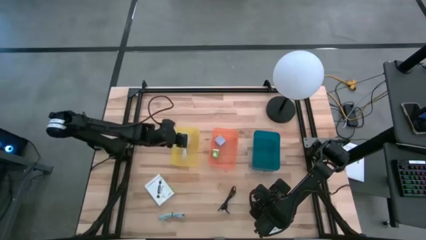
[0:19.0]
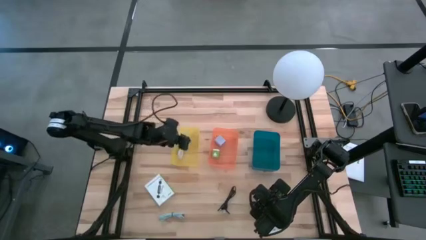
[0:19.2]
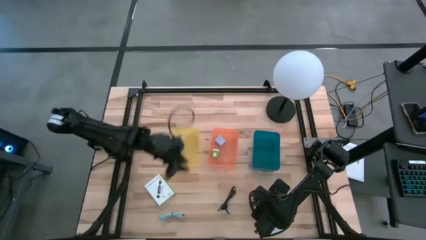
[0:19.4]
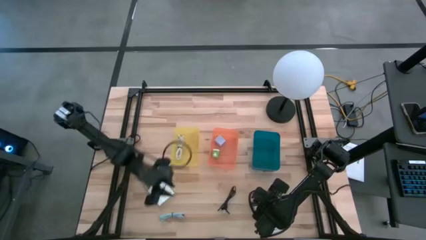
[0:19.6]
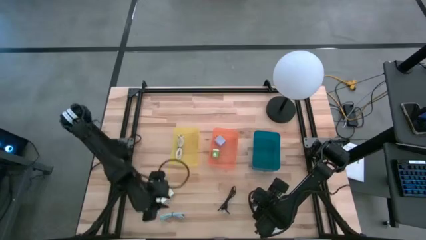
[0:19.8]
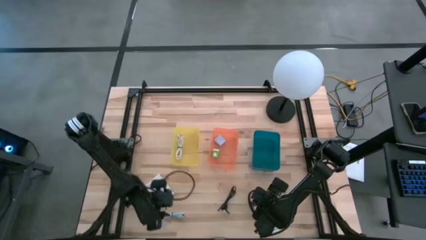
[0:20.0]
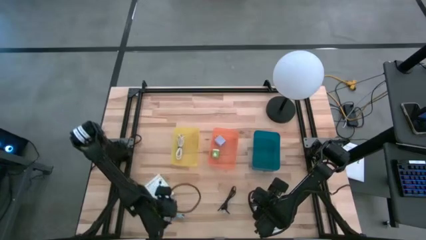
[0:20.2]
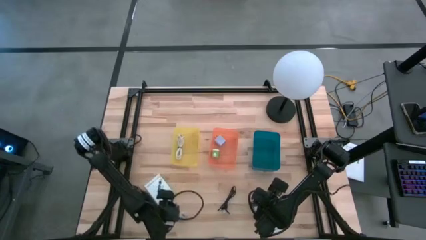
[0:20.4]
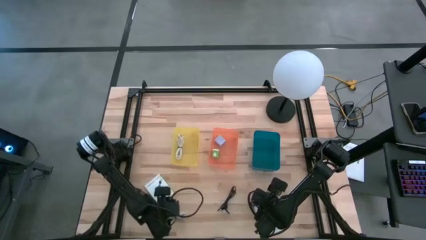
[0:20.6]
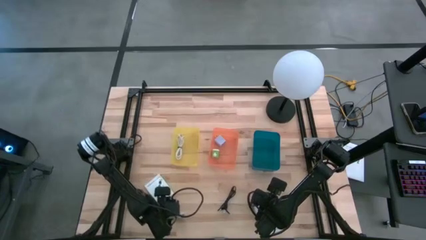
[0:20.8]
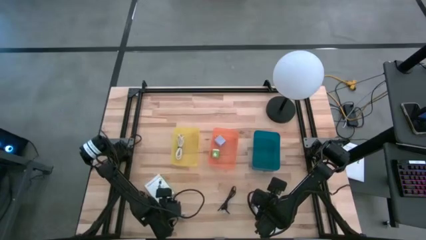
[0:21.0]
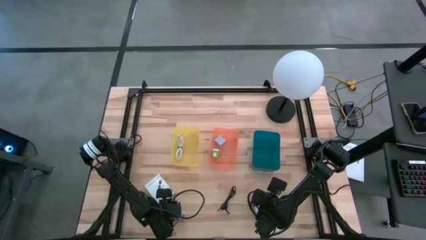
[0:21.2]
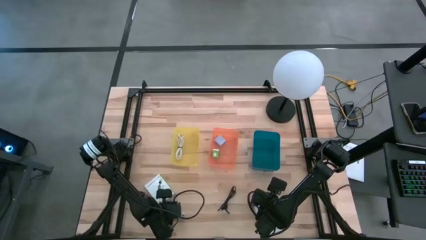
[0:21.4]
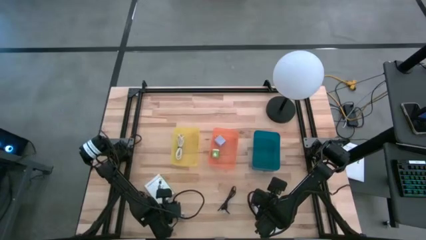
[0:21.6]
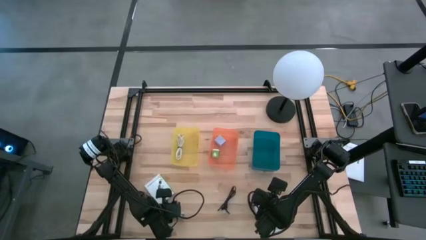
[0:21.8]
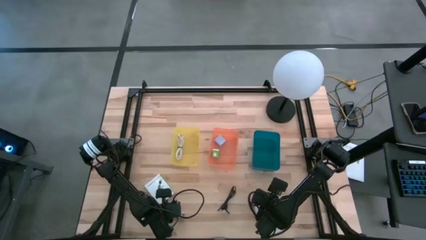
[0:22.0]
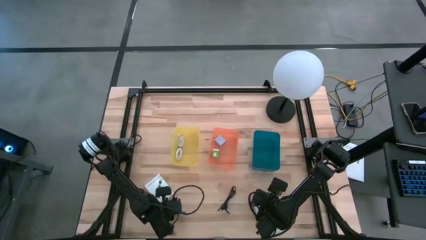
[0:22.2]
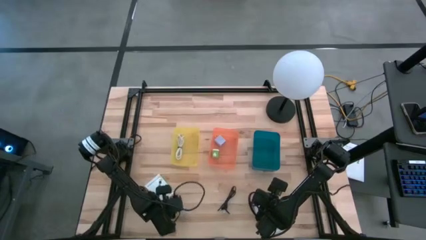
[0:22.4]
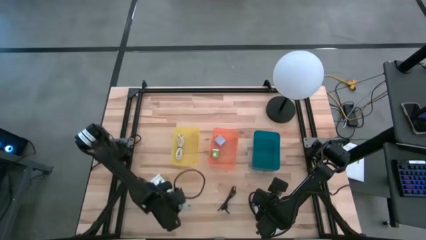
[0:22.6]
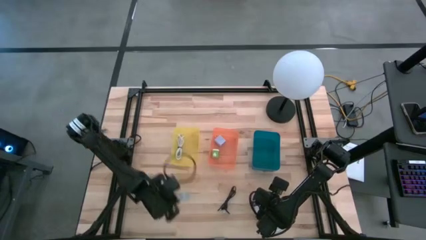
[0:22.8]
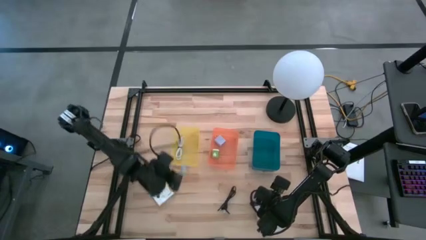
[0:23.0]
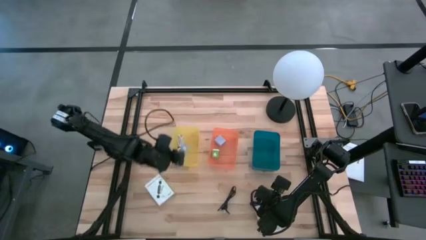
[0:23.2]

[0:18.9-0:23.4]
Task: Pick and place items into bin
Put the light blue charger cable into the yellow bin

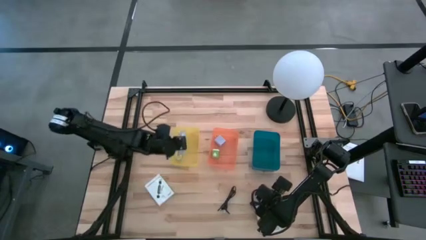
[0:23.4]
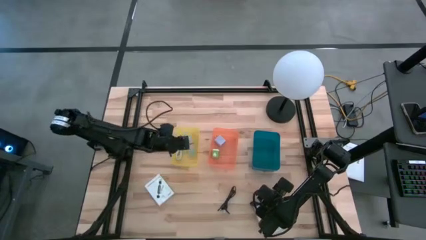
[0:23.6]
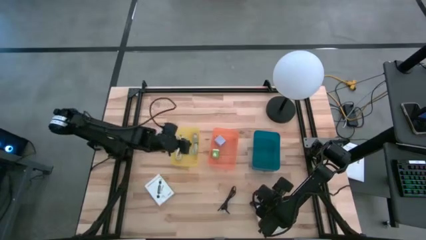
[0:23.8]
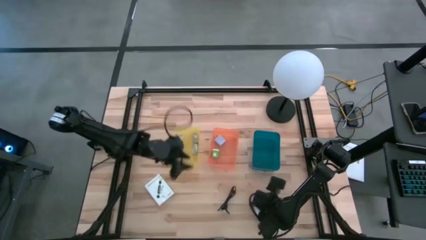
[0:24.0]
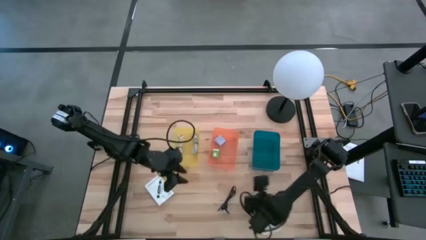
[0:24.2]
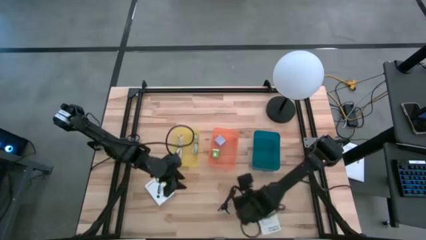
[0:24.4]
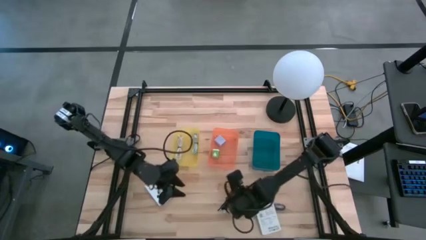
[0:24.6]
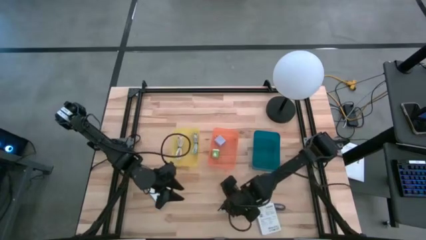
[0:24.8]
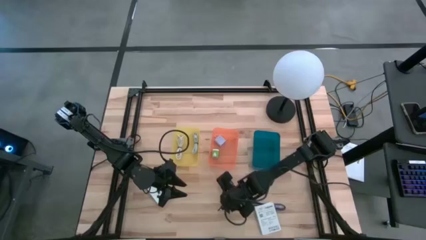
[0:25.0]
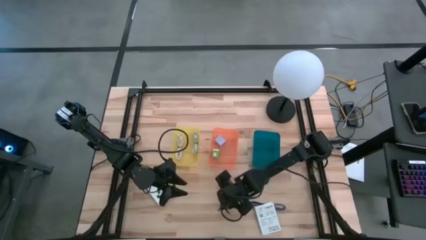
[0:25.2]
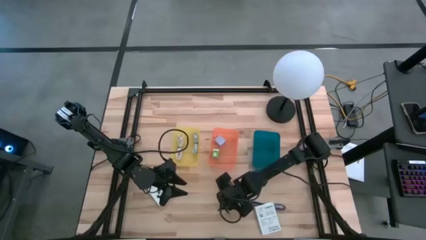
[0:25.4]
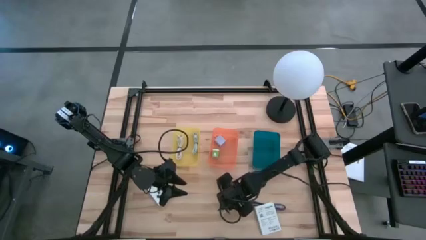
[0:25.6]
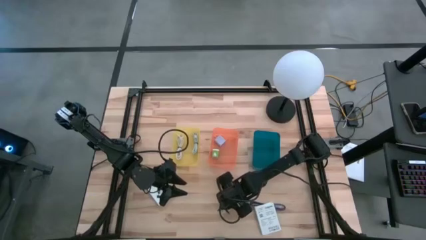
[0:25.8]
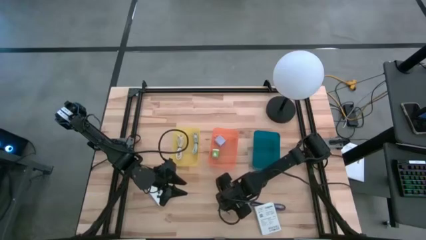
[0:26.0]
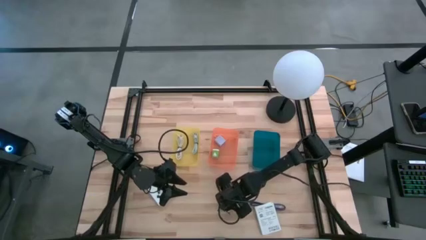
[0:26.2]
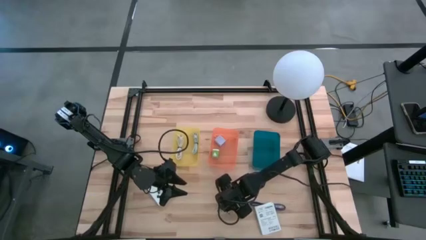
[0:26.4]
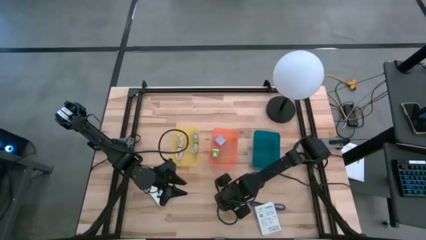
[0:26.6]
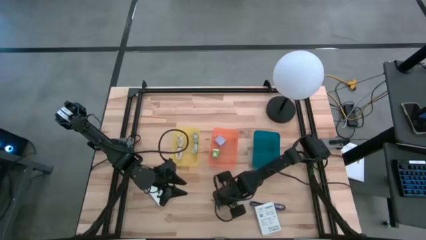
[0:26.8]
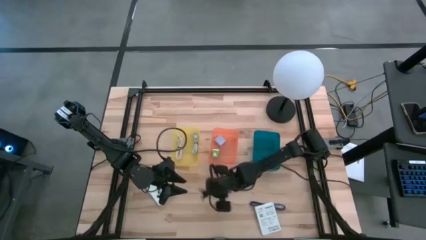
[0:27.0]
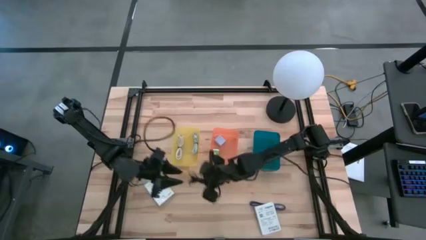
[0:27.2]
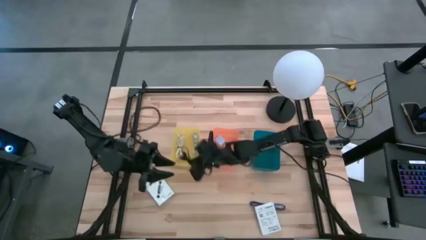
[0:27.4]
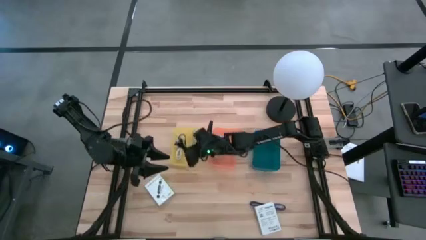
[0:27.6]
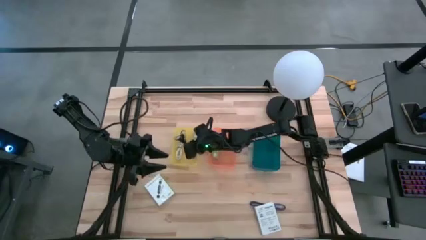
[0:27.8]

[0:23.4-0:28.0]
Put the black charger cable into the yellow bin

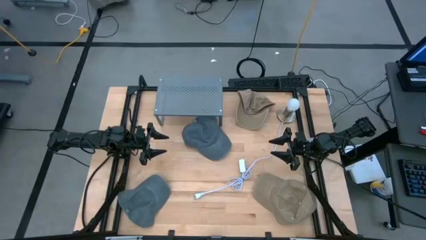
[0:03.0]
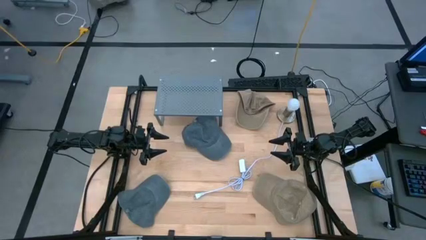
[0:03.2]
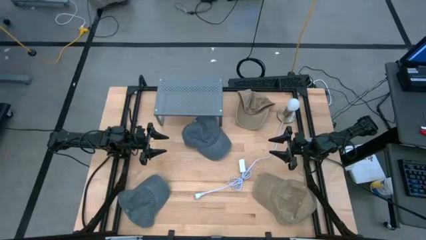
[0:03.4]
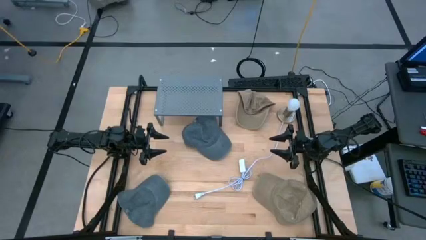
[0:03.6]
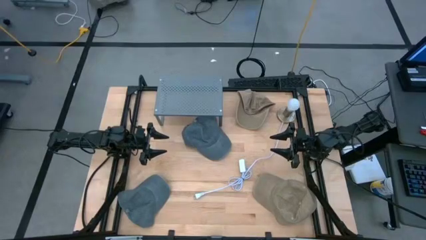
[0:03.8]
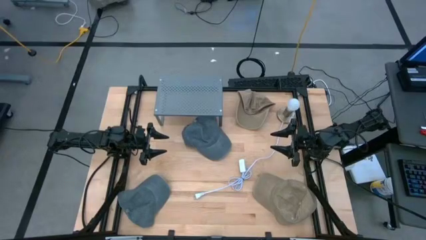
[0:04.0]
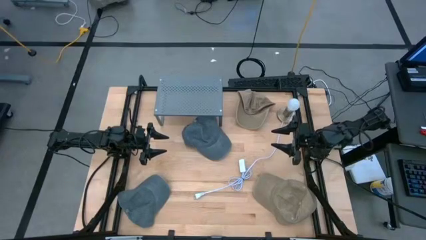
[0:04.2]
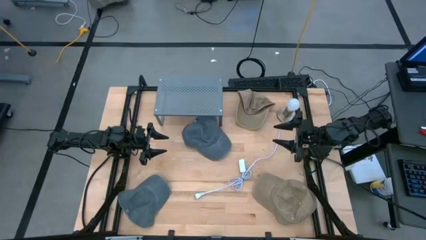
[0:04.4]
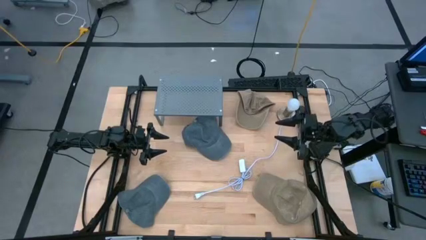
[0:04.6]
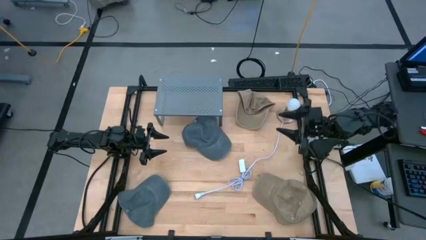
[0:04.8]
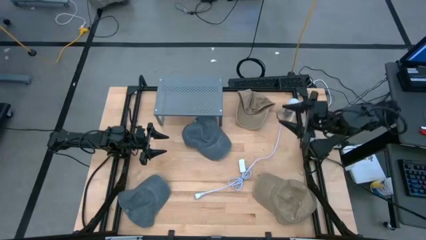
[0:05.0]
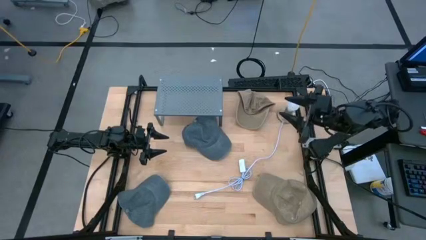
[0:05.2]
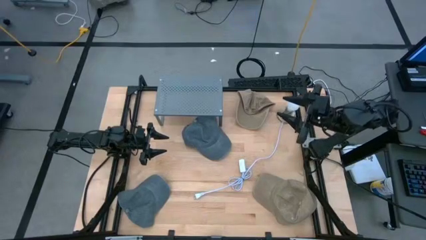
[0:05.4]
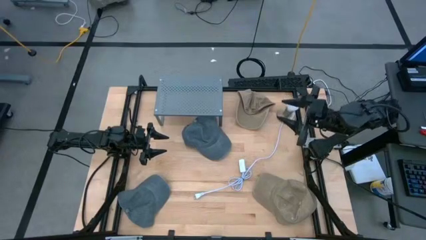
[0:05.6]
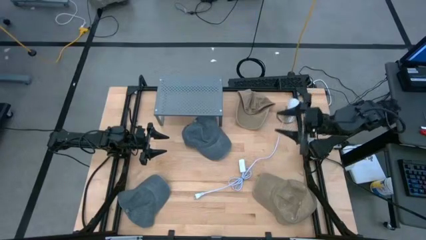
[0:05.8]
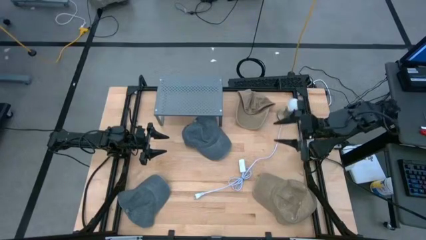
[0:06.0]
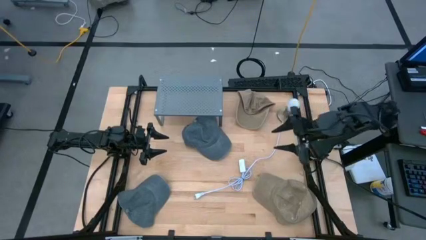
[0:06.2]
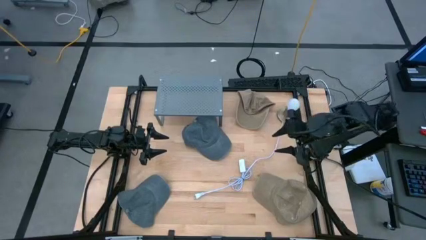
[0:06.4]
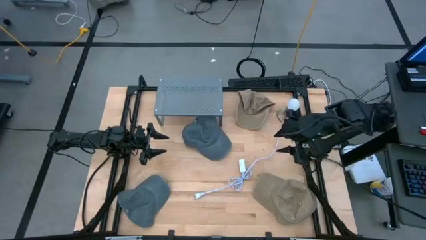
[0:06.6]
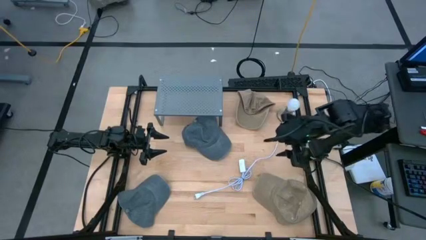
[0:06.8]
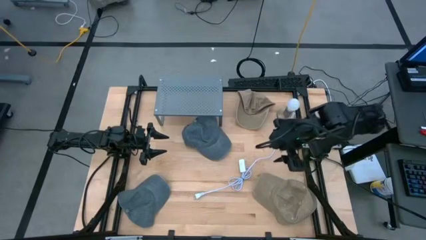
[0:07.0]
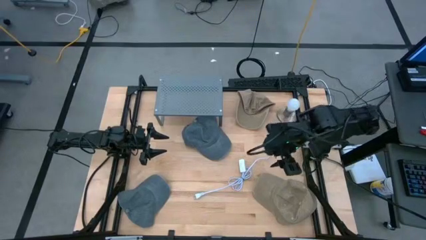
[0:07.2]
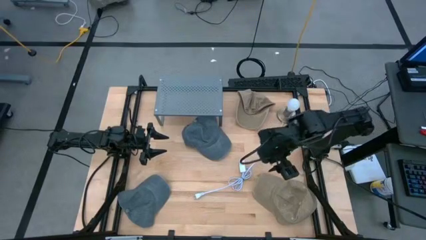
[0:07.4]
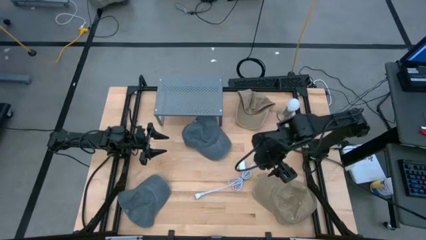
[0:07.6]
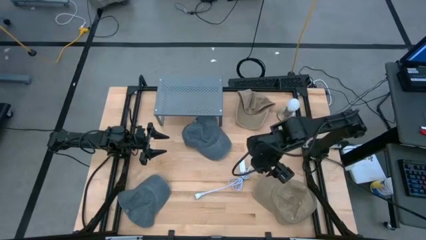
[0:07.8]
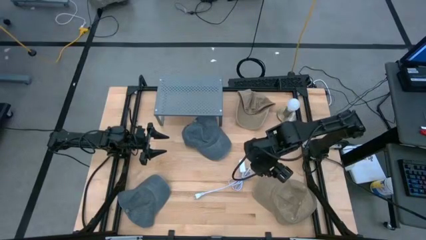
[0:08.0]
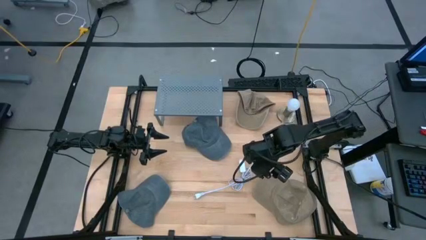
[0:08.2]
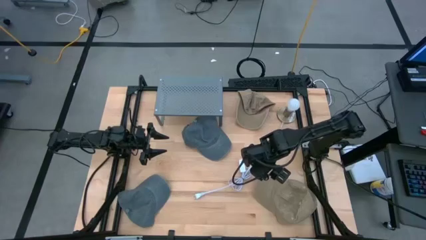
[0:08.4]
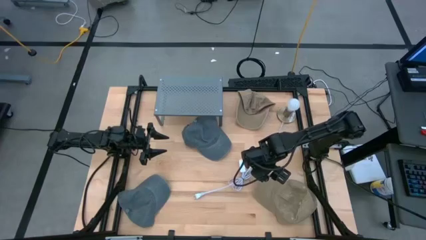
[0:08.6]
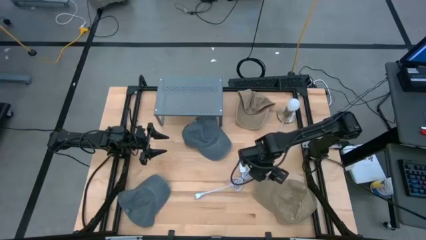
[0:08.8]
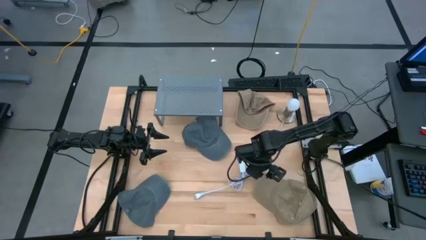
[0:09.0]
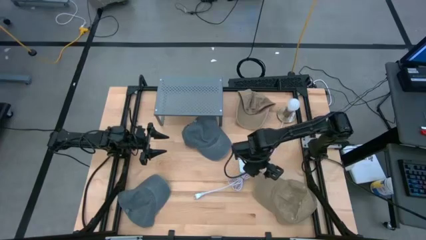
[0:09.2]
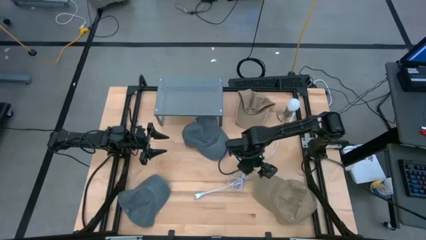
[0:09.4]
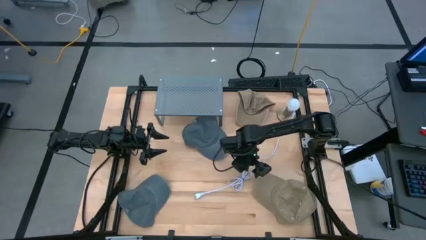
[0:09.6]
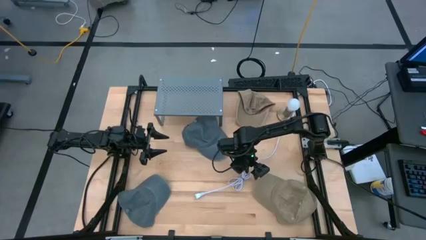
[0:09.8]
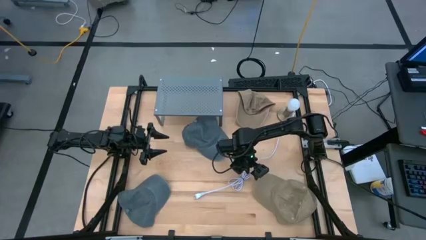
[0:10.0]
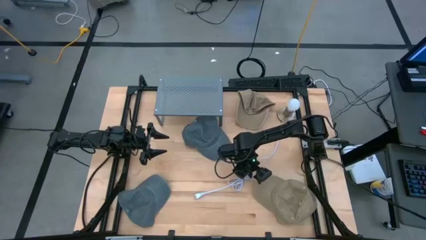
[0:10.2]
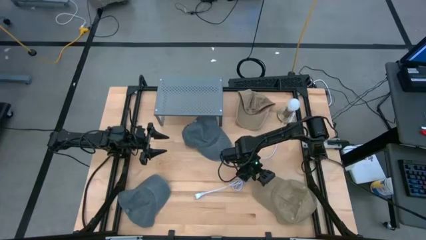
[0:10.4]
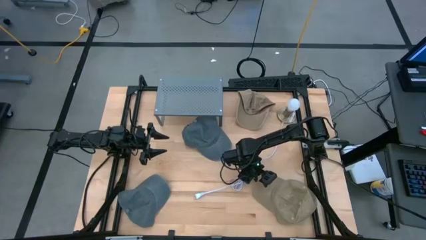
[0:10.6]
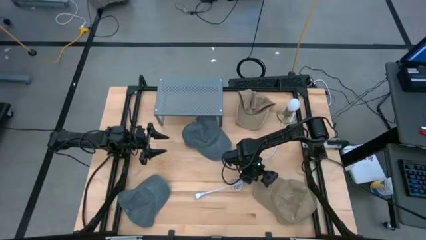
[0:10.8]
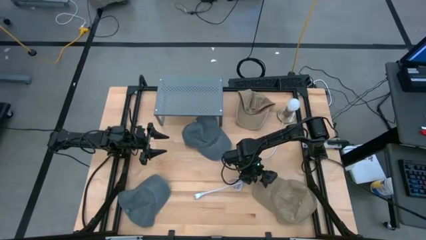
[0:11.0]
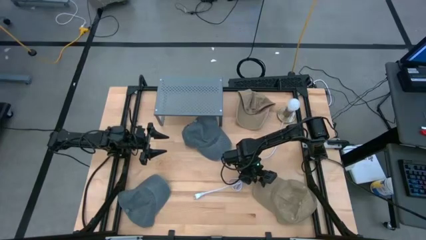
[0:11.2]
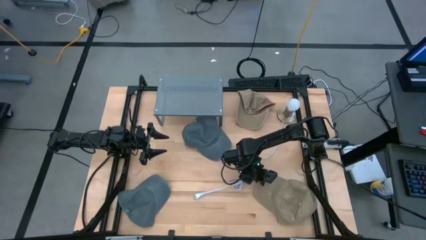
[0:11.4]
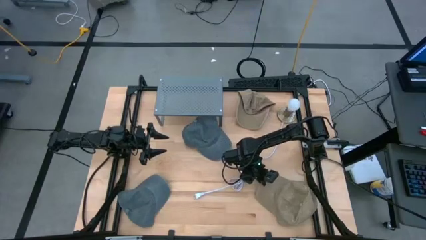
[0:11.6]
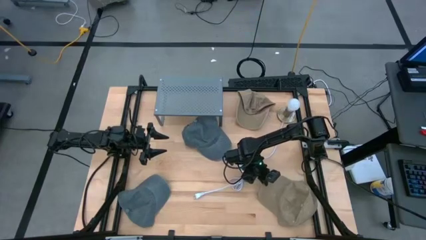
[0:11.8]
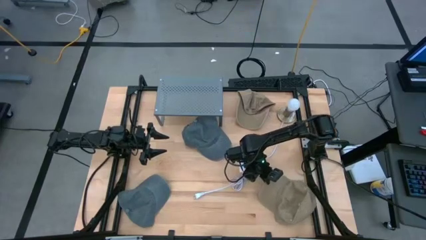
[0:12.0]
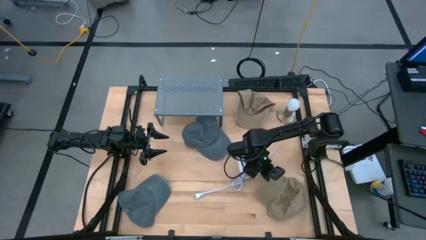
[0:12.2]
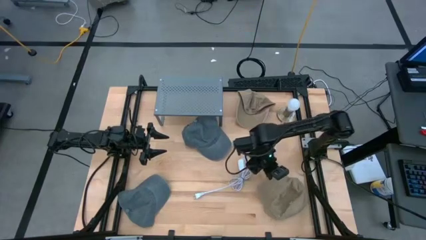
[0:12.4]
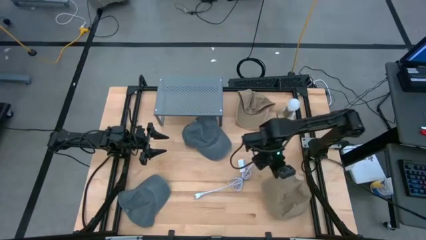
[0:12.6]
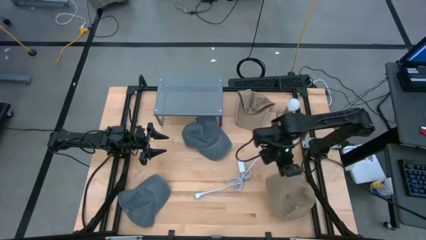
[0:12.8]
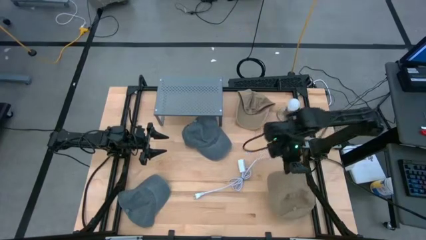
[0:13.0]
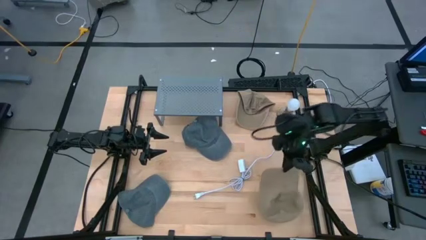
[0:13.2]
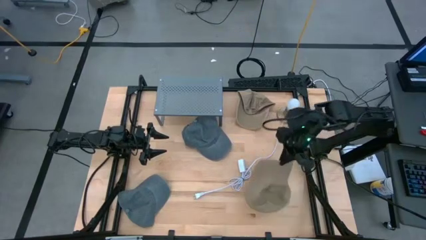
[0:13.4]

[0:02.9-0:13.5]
Task: Pick & Place hat
Put the bottom brown cap on the shelf
